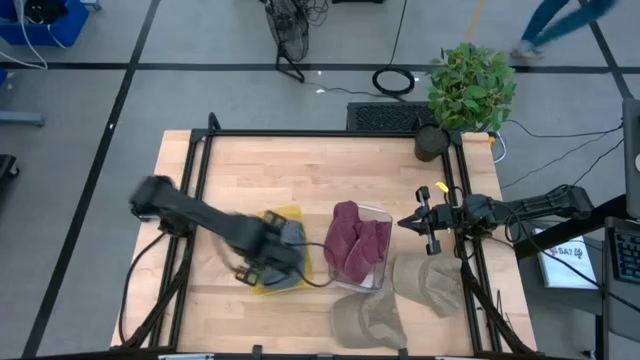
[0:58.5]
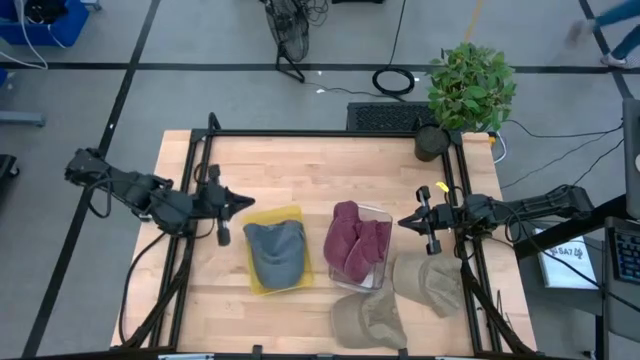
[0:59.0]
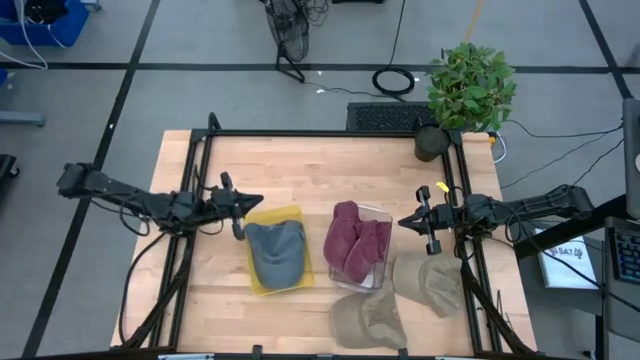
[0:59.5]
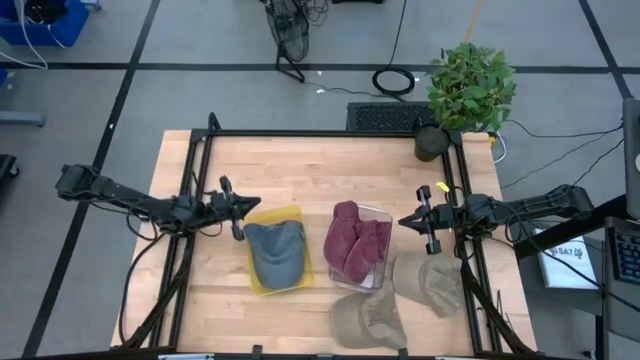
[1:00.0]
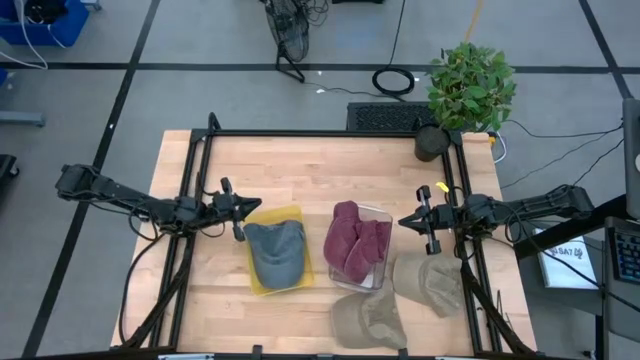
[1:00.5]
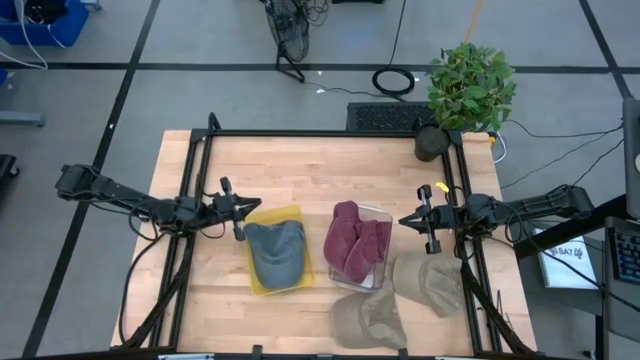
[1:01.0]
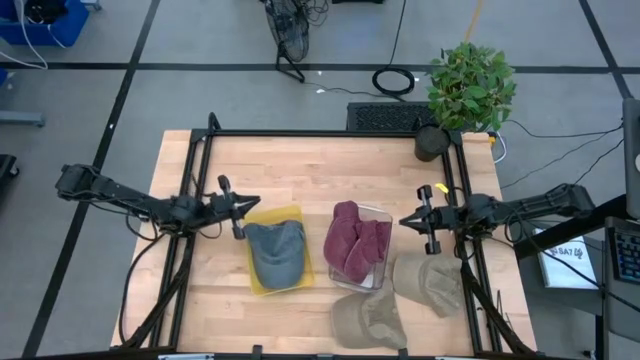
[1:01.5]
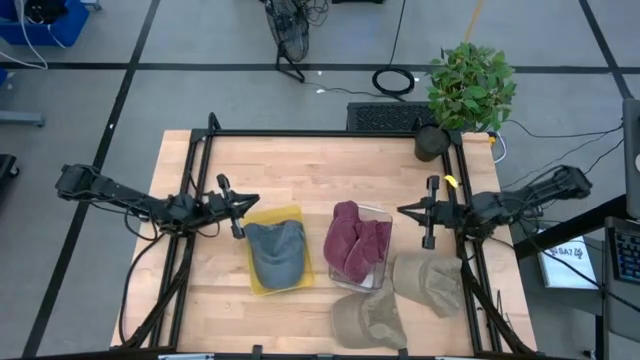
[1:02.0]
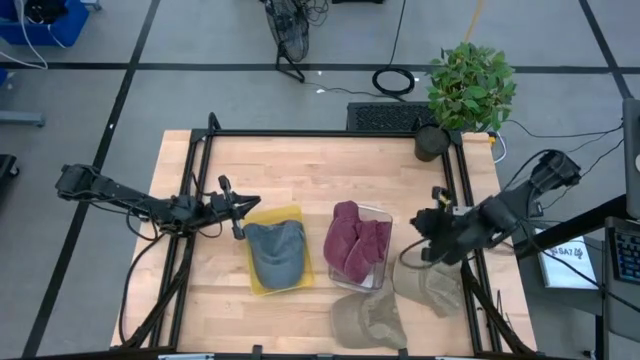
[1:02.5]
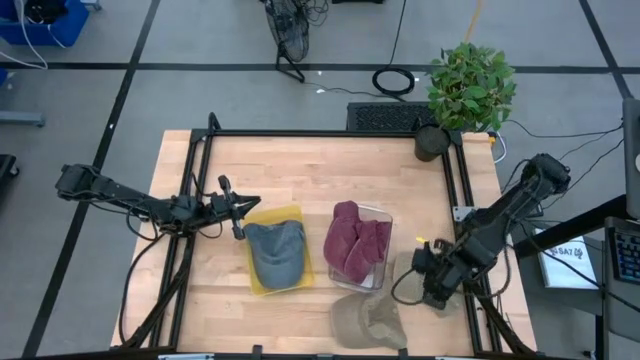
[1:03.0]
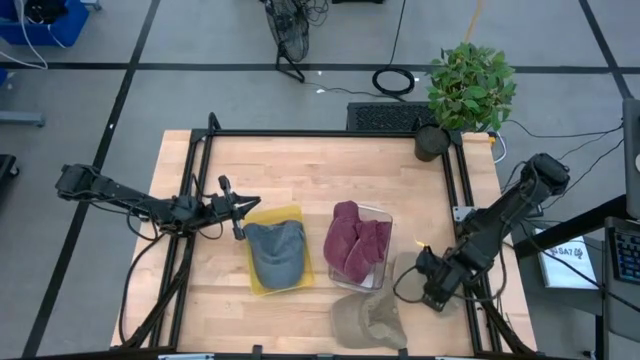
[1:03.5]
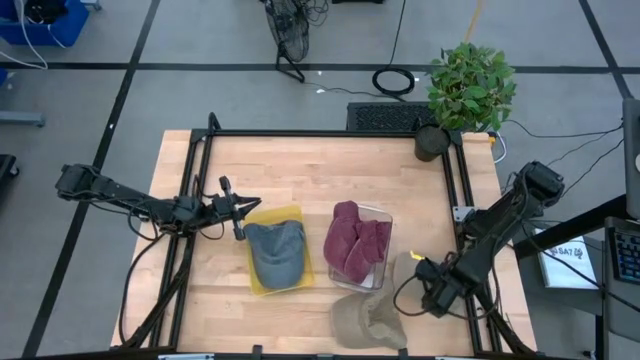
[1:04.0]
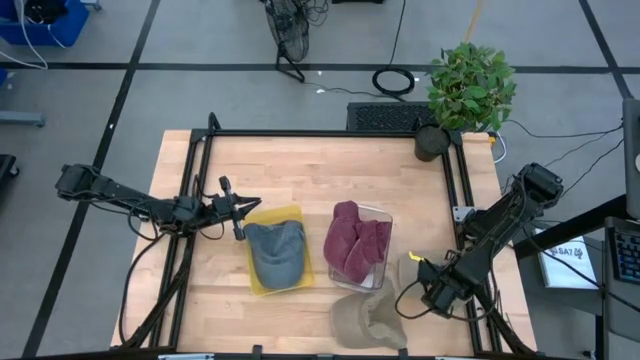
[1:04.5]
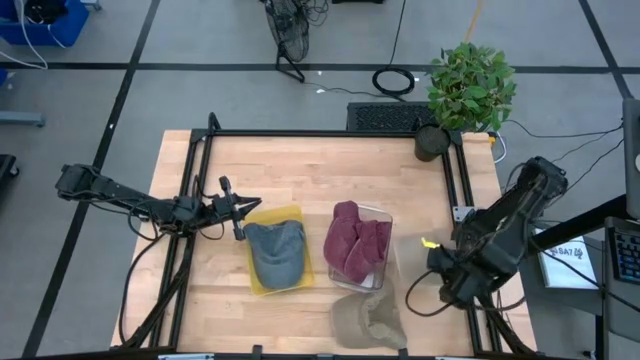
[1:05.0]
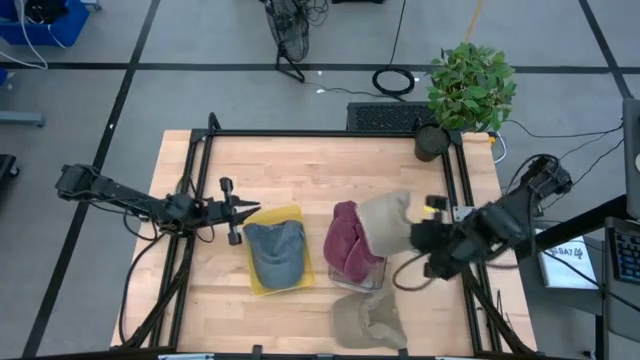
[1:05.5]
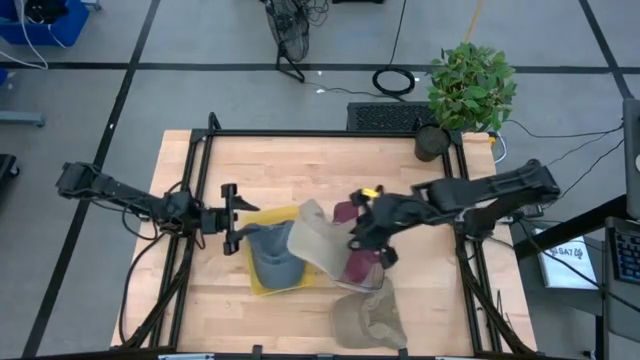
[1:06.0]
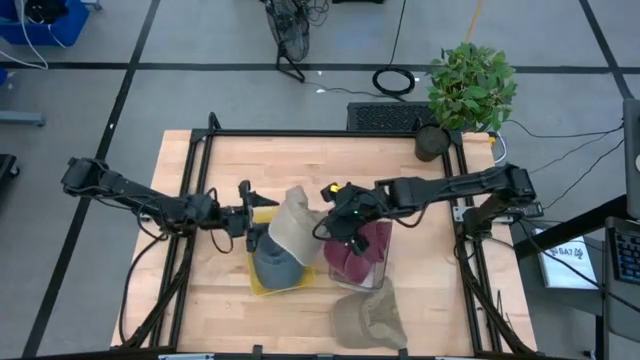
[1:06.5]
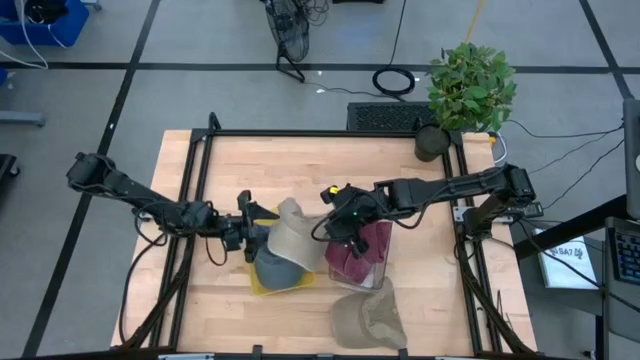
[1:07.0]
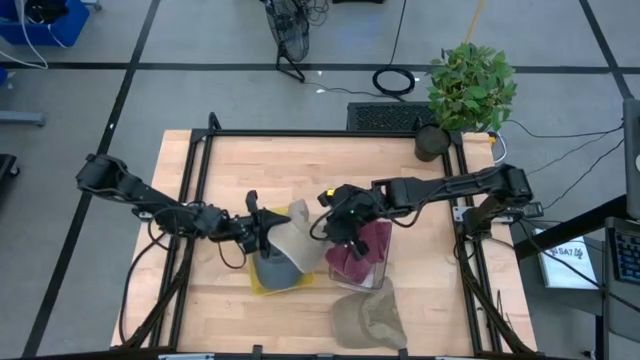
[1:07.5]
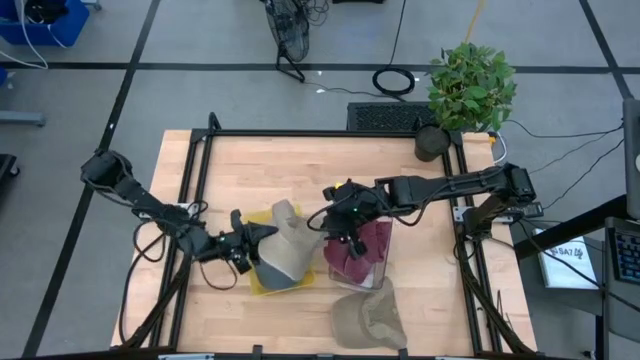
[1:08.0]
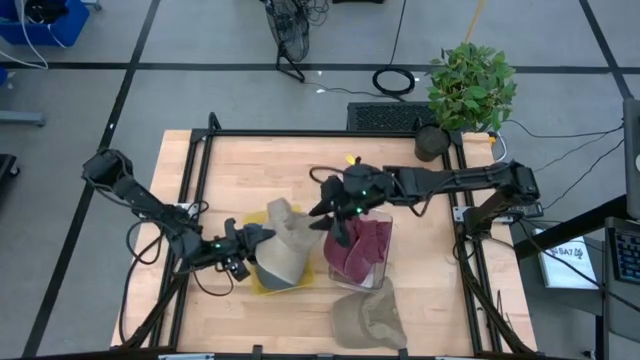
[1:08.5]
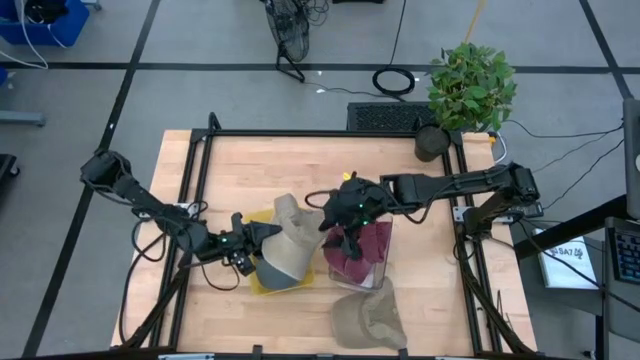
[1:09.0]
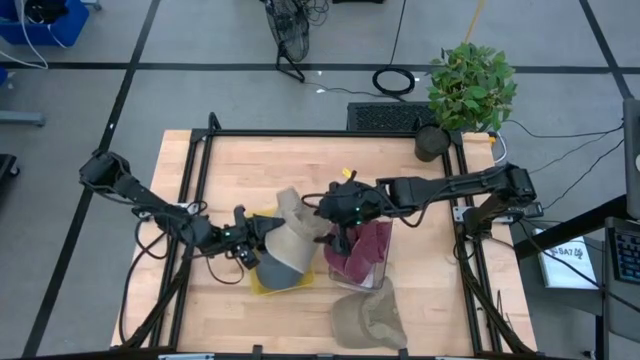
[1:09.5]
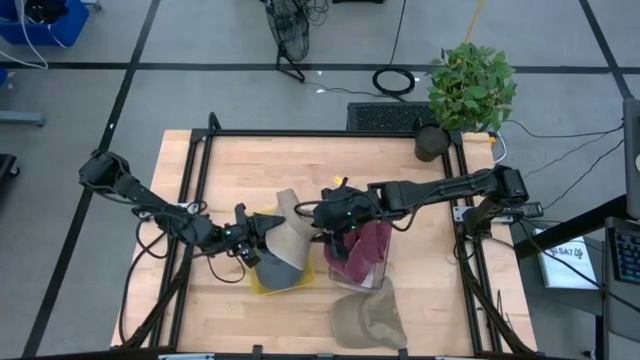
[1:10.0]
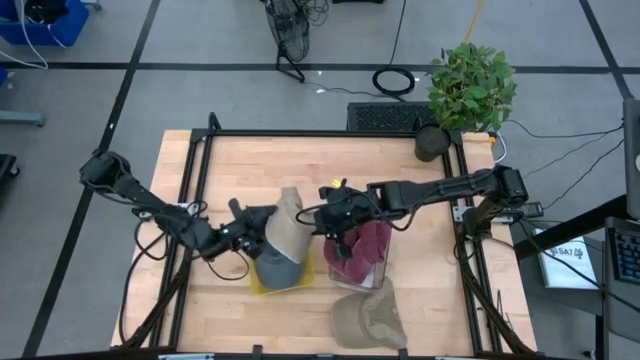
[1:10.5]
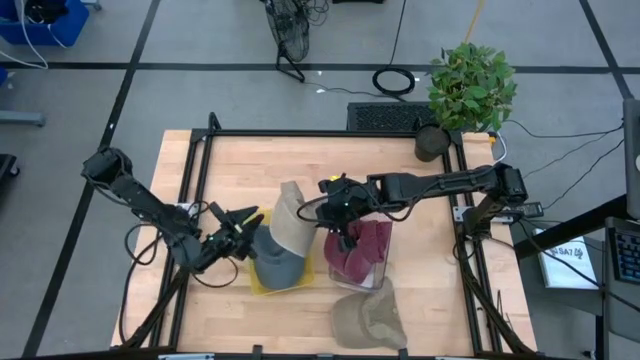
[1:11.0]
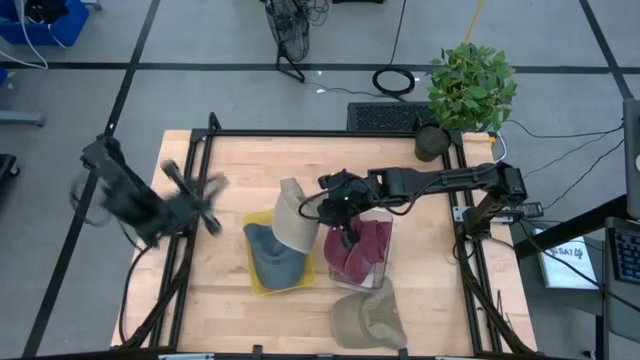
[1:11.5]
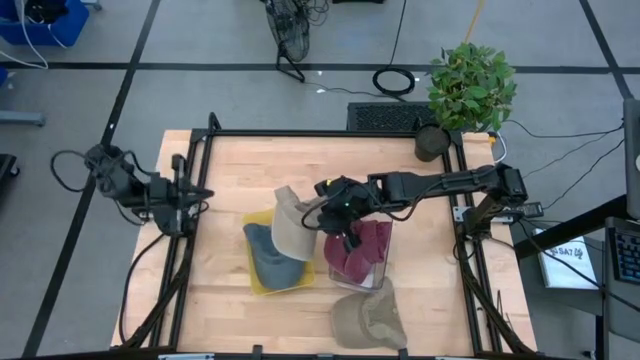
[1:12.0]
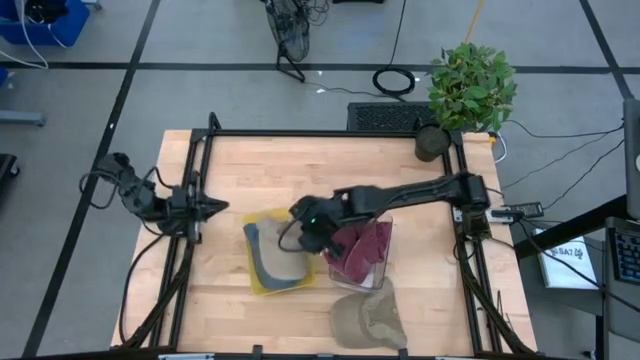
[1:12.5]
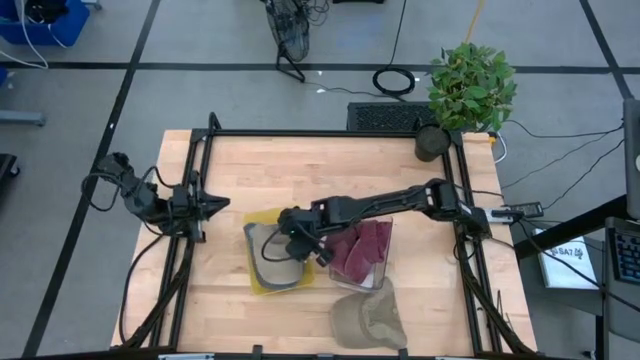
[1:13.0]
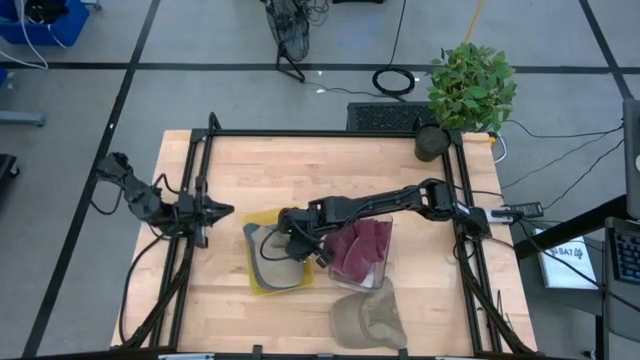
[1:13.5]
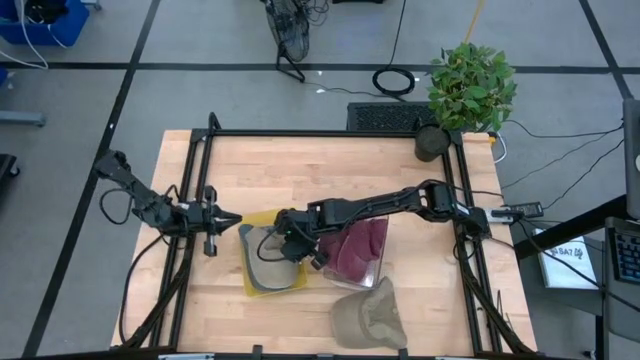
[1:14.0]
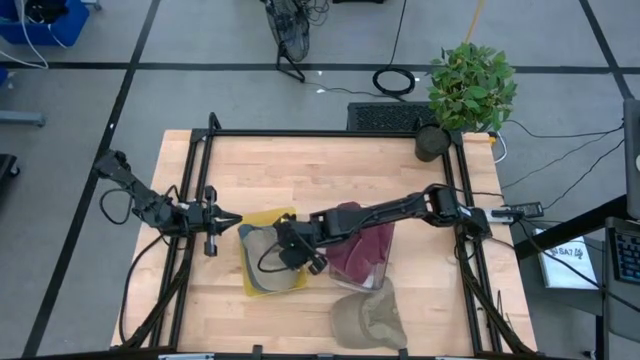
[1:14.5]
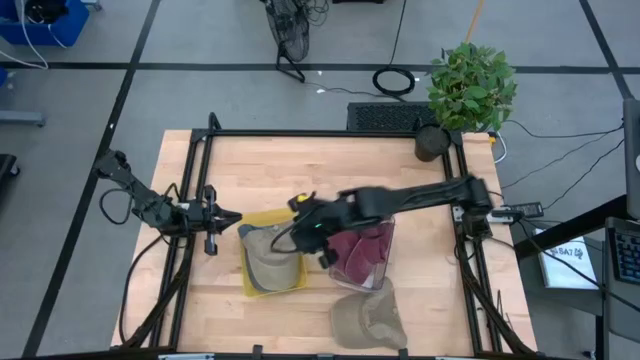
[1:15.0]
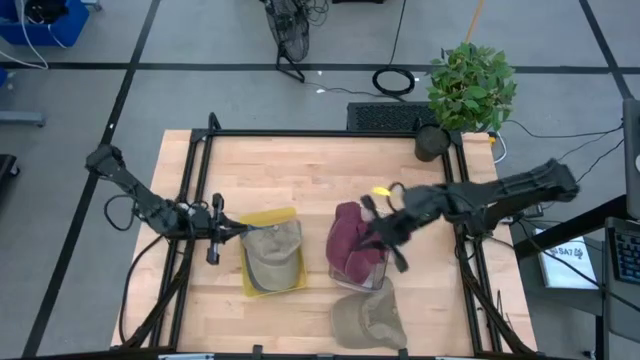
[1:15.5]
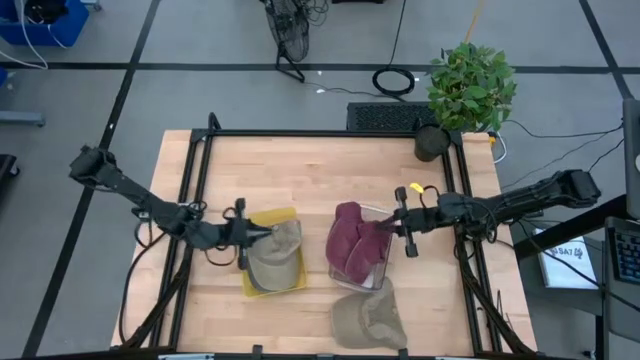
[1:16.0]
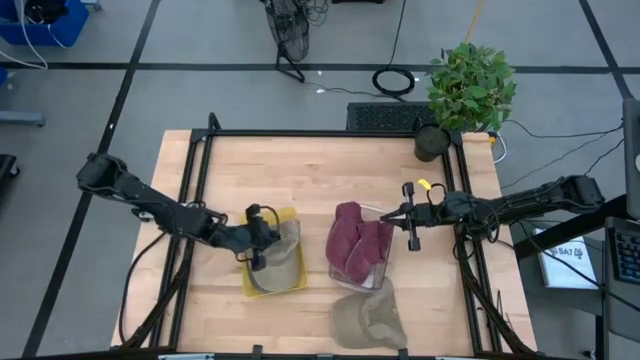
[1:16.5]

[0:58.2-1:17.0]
Task: Pick & Place hat
Put the top brown cap into the yellow bin
